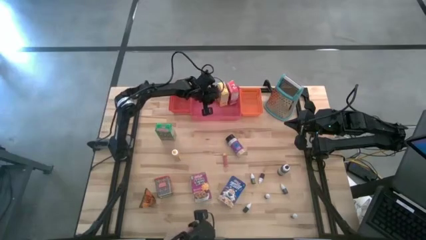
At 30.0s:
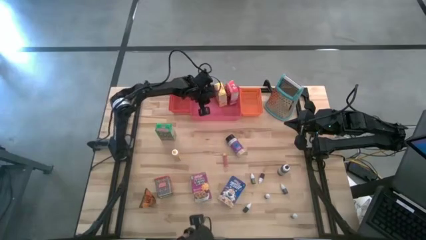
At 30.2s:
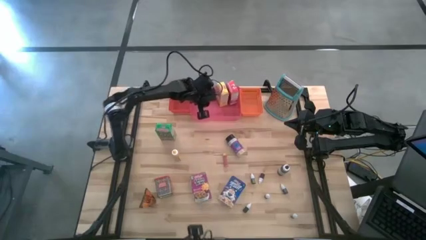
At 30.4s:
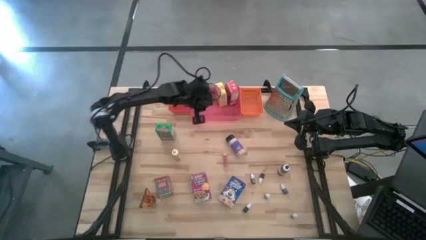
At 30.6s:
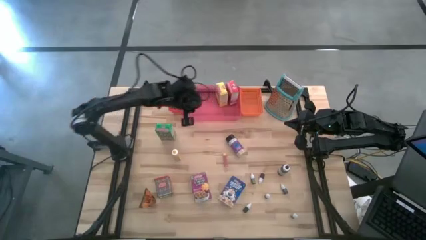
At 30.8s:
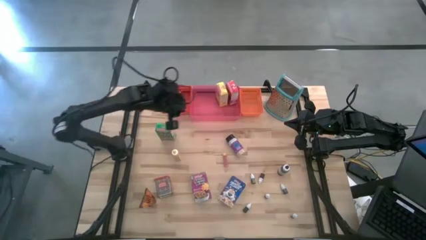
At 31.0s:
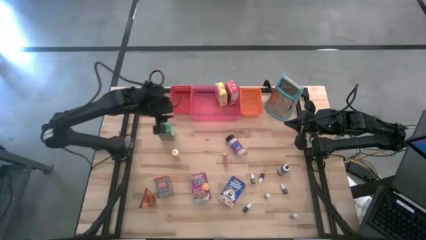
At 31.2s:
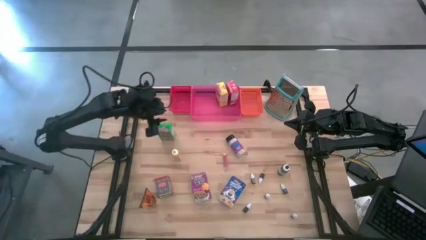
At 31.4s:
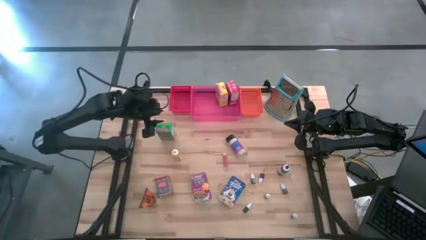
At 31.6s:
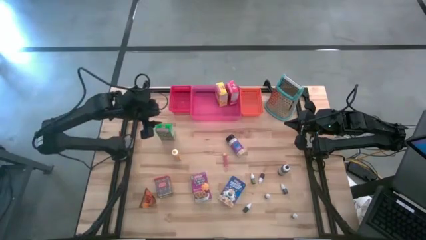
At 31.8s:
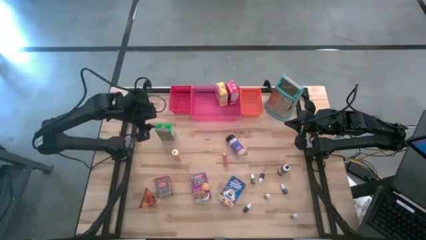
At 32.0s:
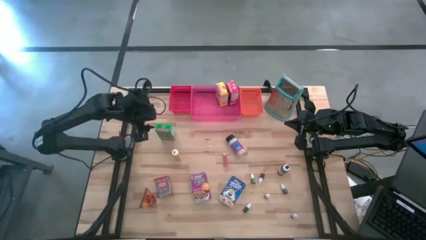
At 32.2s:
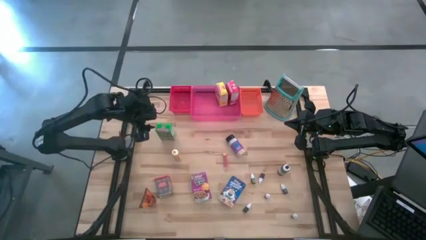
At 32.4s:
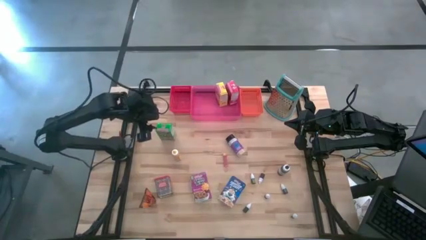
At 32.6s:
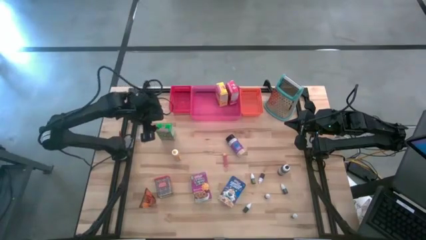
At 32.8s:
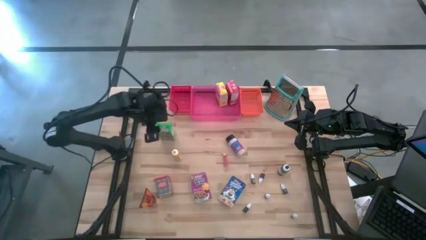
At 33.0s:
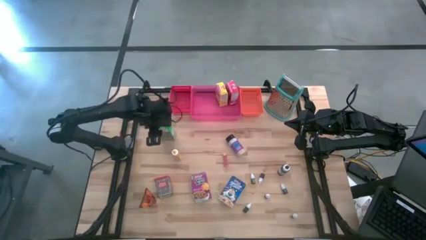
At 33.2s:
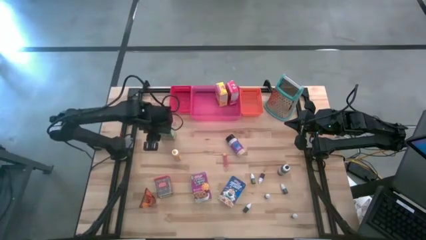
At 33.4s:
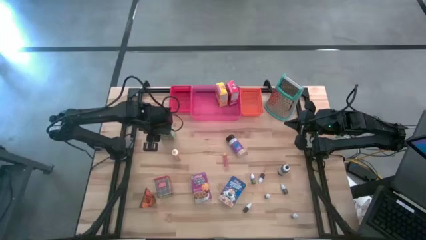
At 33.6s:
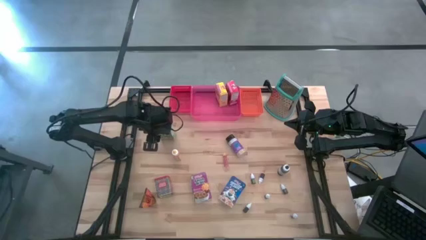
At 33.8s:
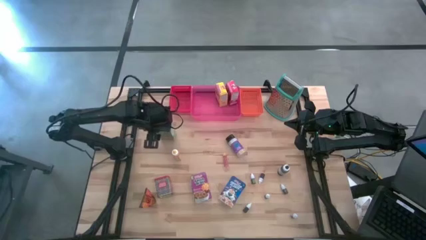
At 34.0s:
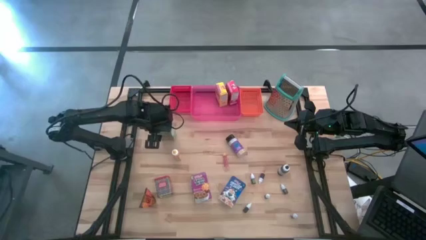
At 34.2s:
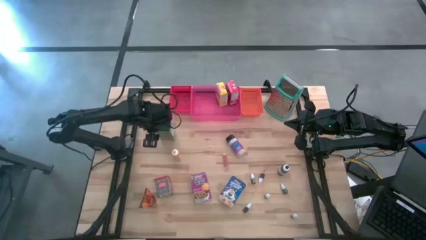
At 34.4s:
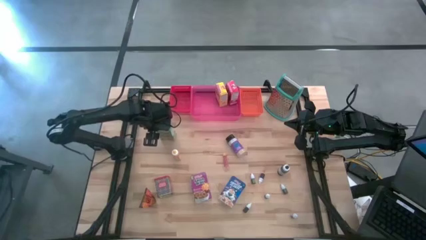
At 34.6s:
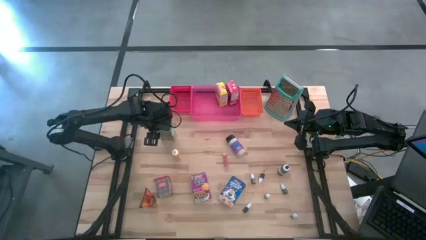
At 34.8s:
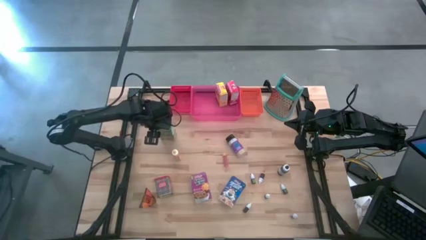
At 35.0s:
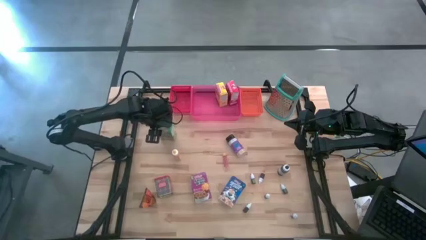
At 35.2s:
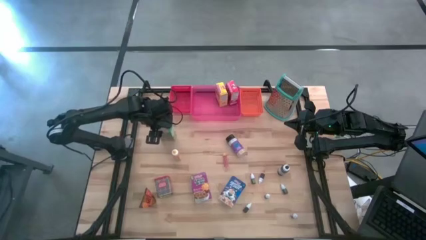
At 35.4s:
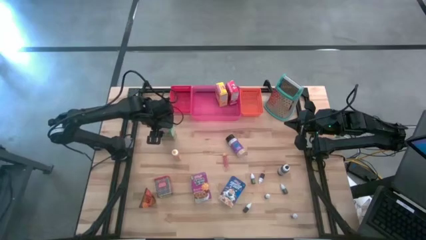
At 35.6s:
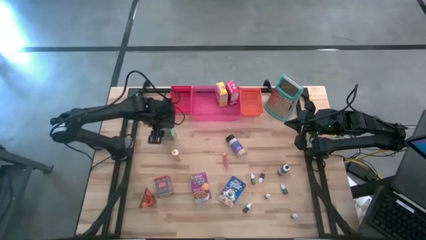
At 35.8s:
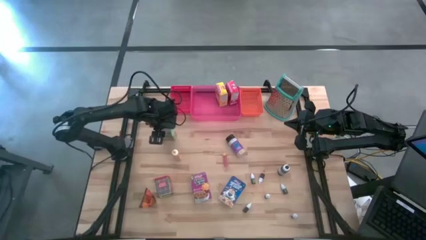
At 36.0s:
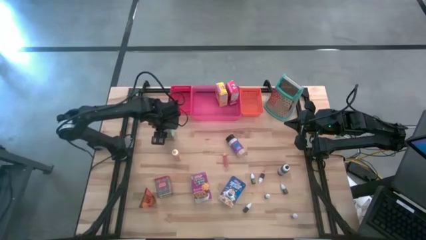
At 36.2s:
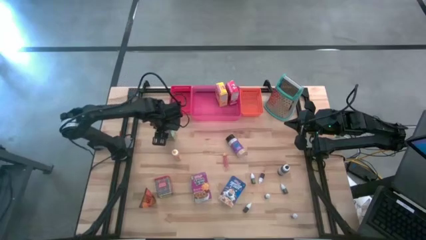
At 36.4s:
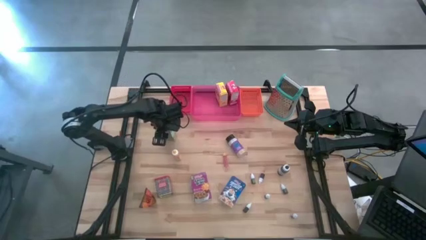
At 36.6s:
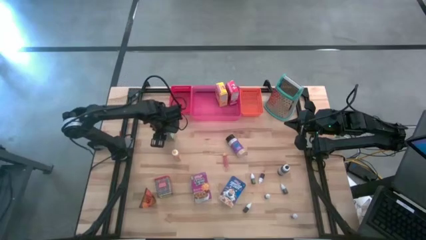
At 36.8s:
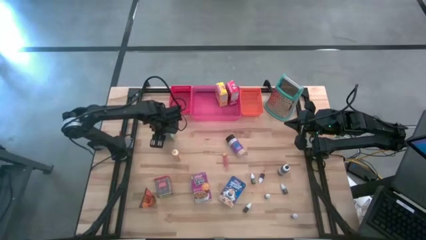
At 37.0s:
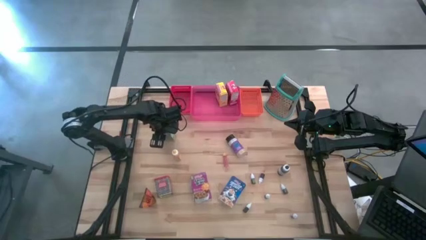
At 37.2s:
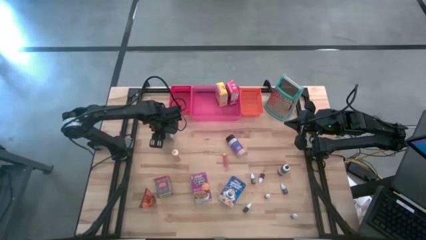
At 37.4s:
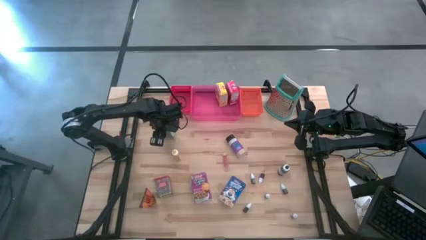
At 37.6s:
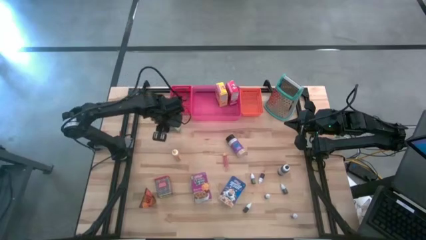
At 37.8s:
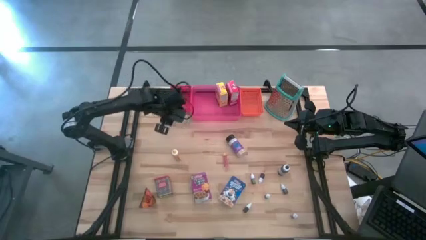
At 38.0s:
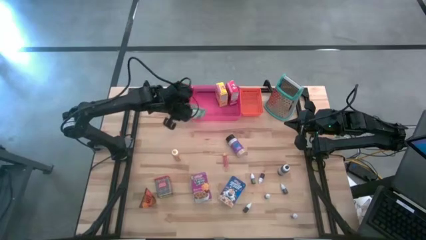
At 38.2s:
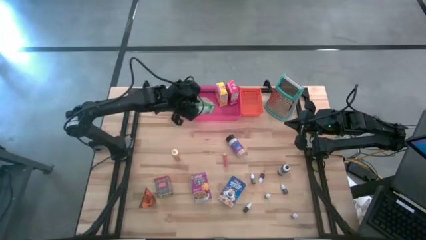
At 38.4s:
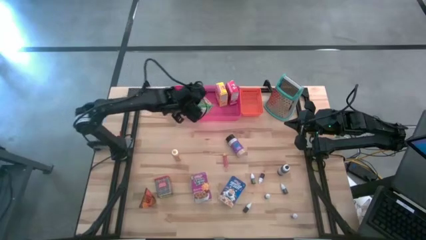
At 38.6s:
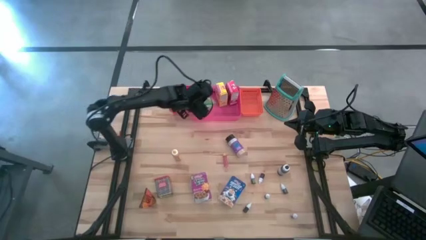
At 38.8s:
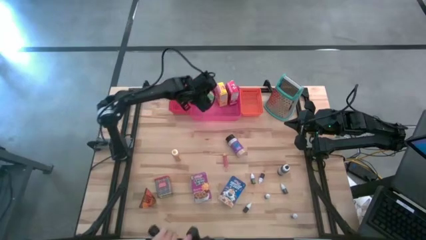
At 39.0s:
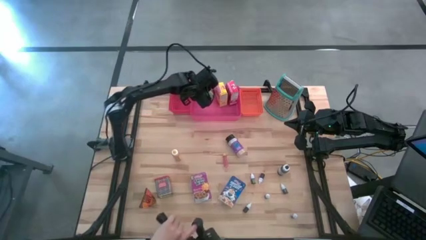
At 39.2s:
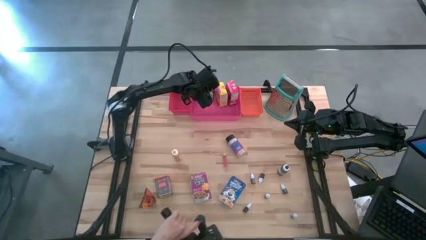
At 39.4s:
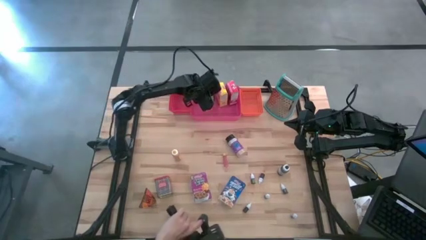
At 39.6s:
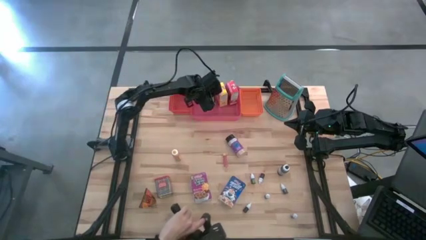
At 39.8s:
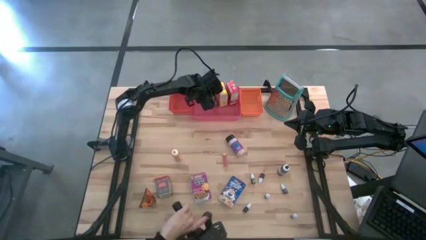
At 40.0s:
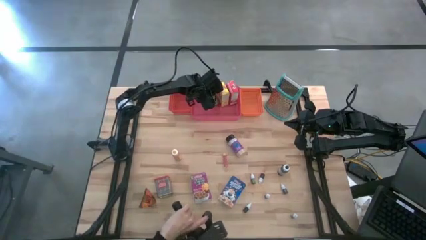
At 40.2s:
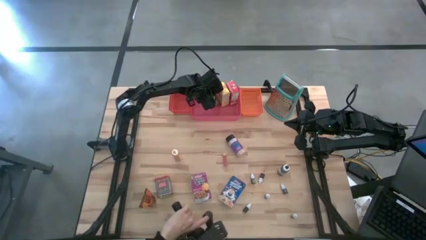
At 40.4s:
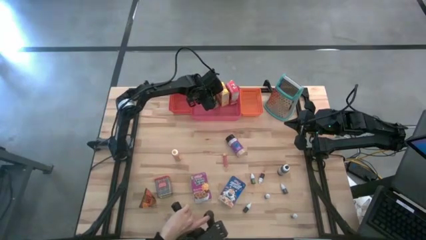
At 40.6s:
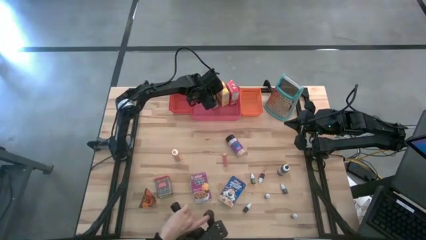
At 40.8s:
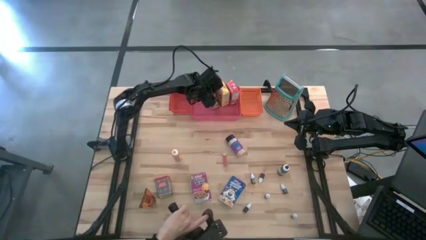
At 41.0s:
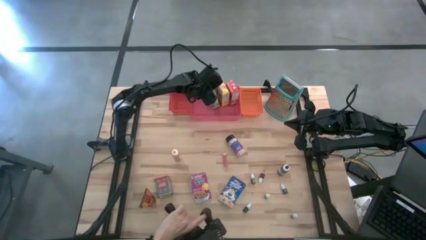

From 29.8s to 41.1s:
Task: Pick & Place Kitchen Items
Put the green cereal box into the pink bin
